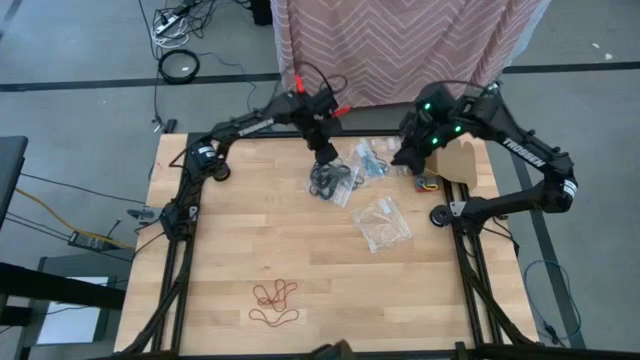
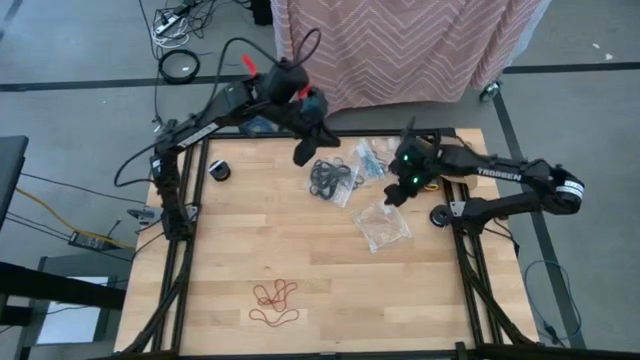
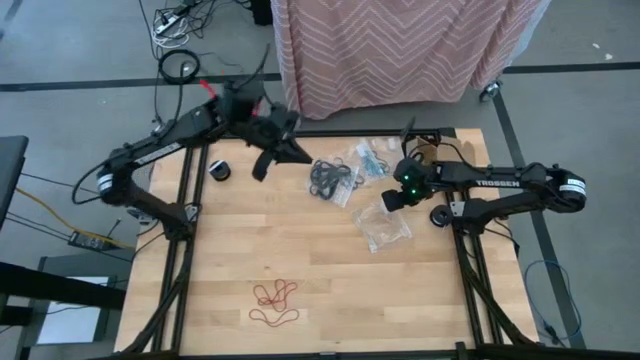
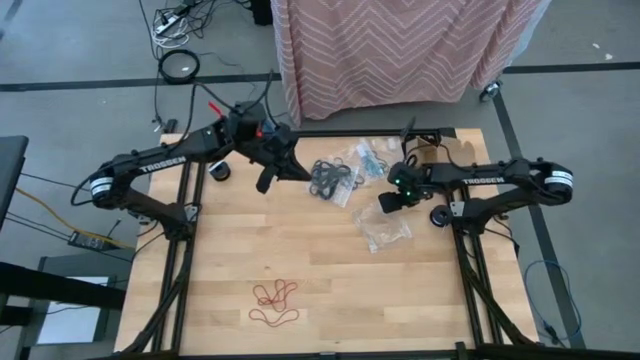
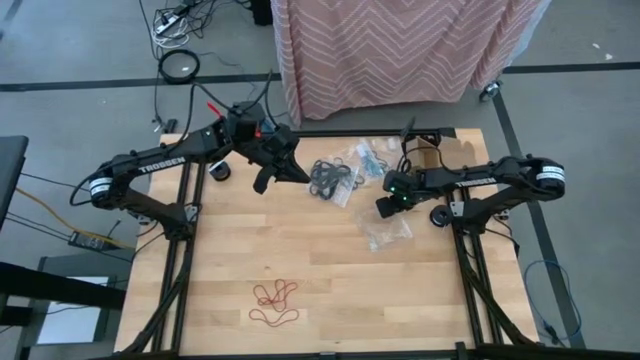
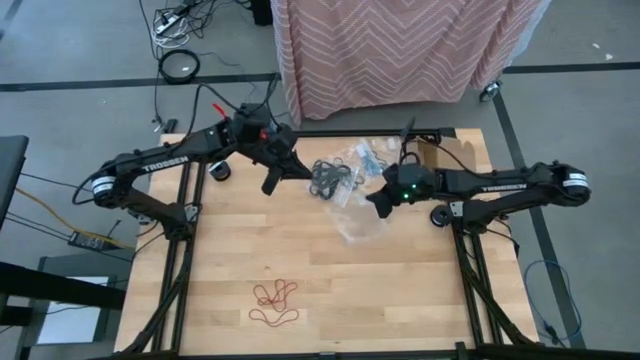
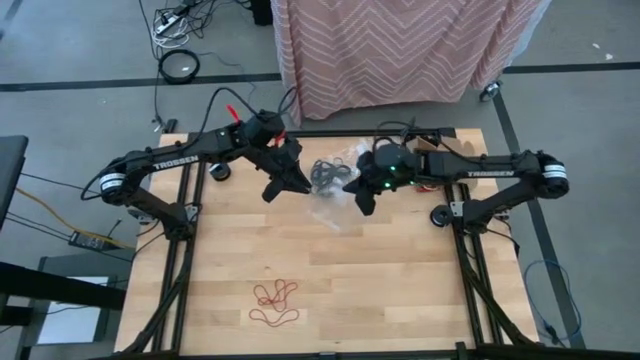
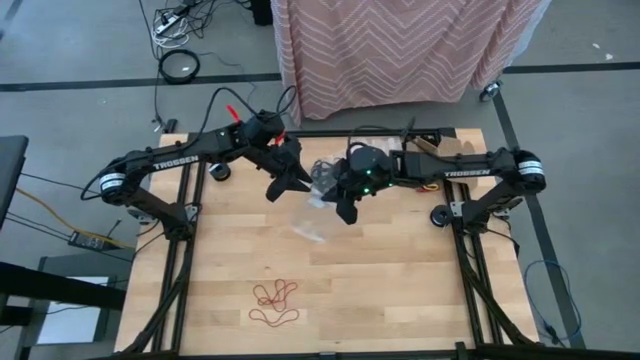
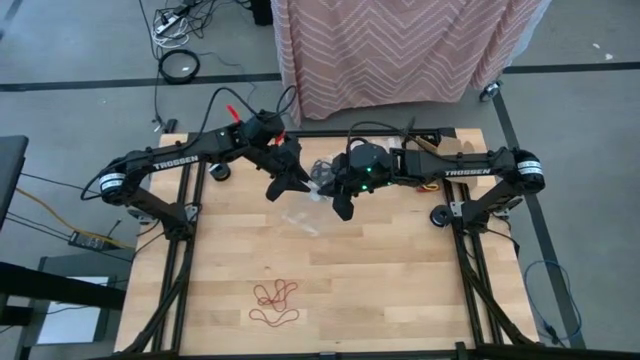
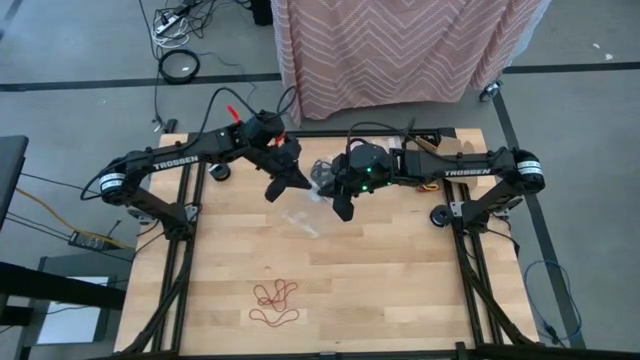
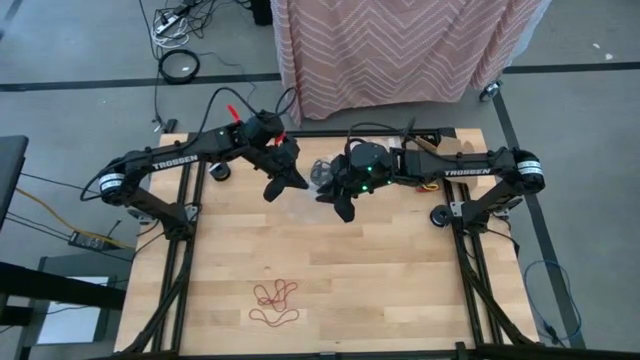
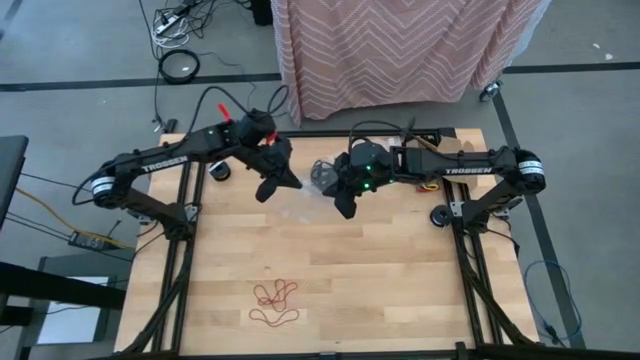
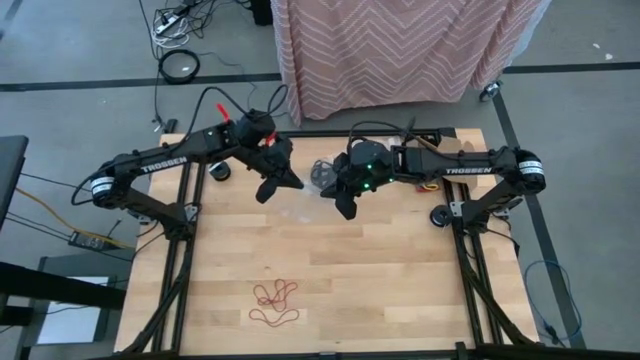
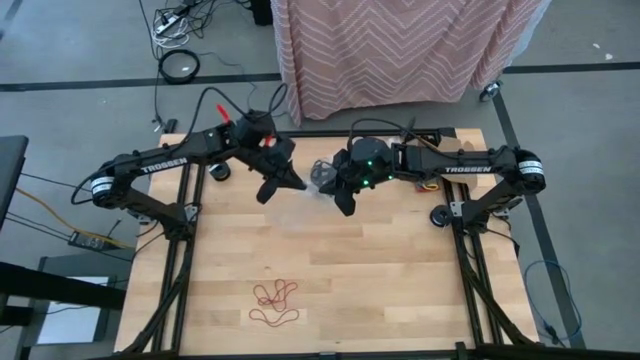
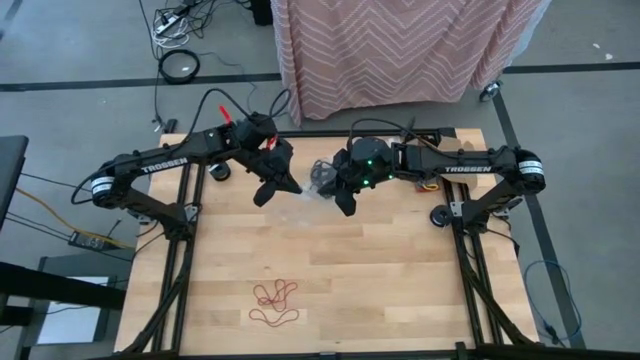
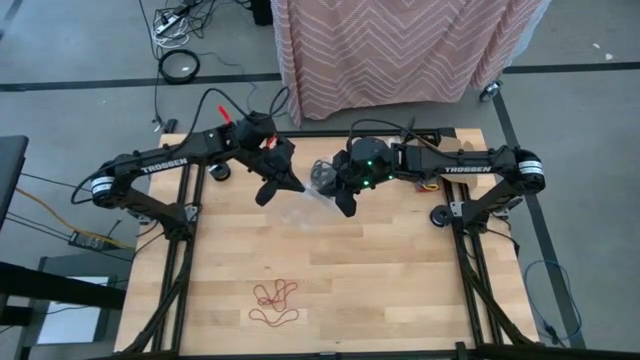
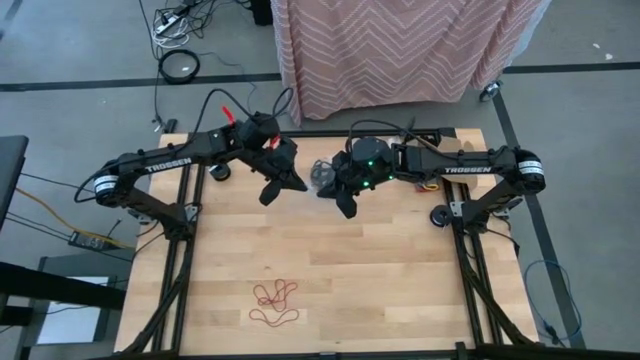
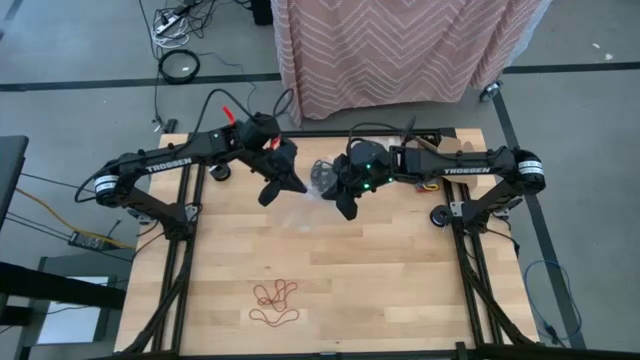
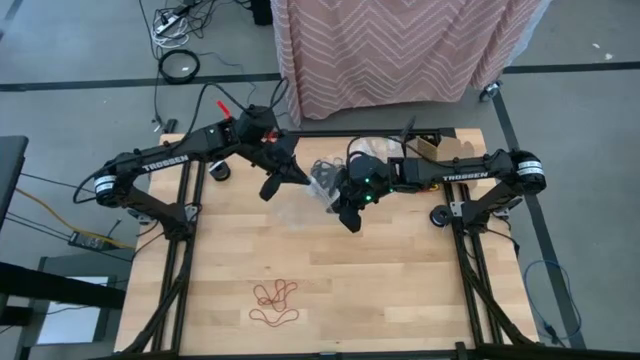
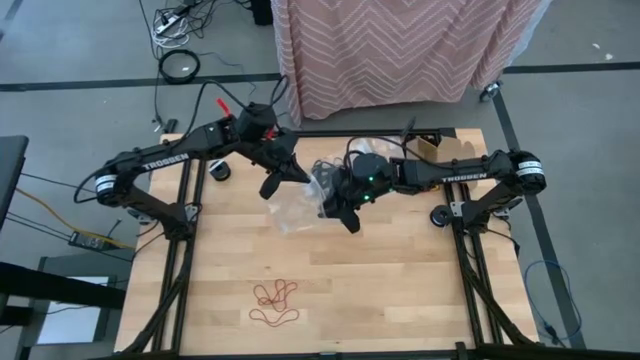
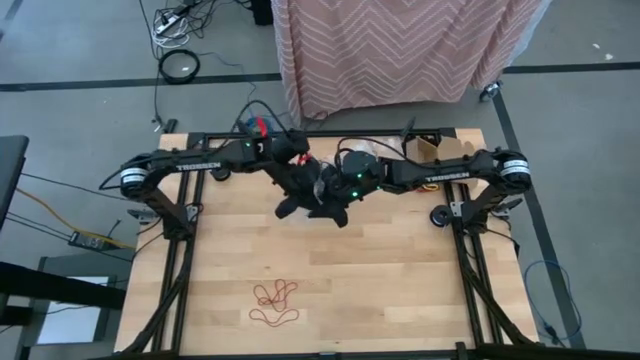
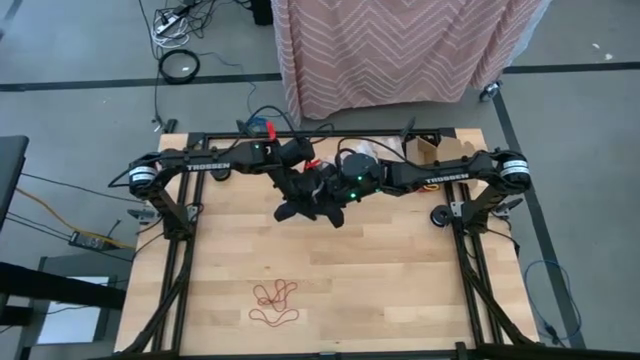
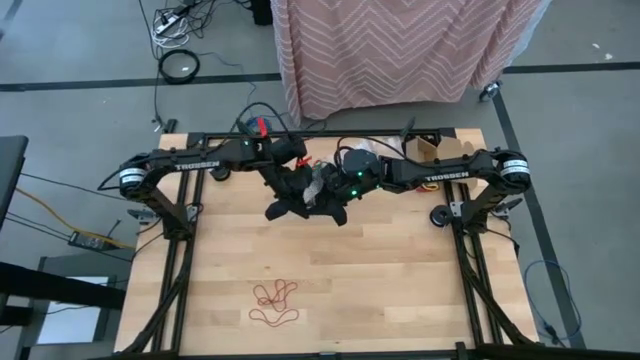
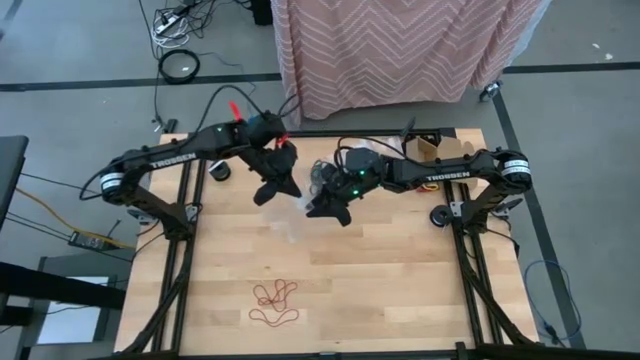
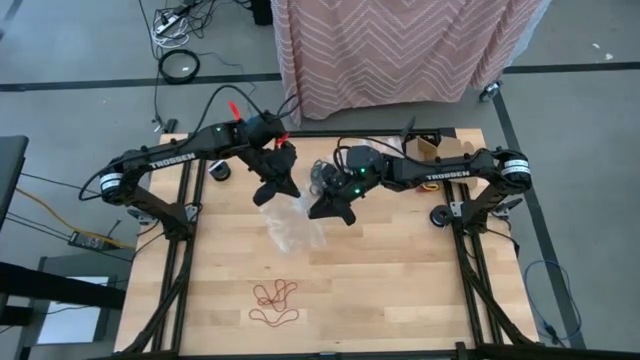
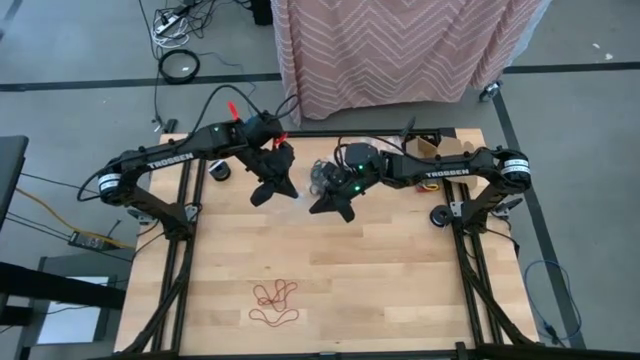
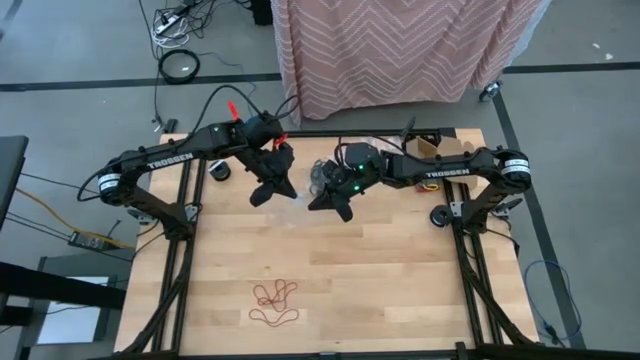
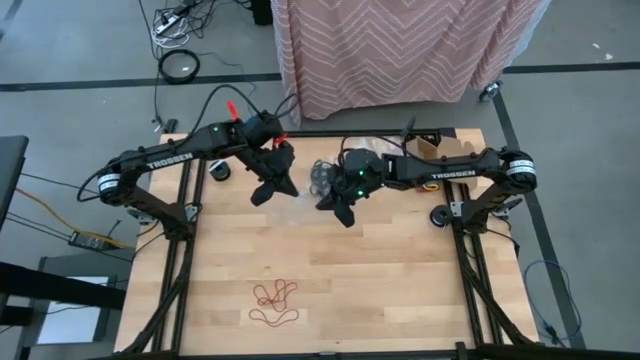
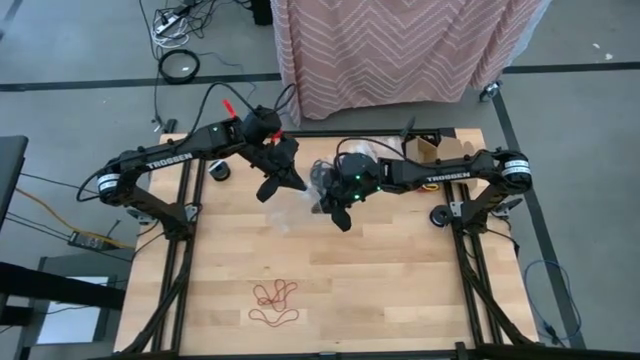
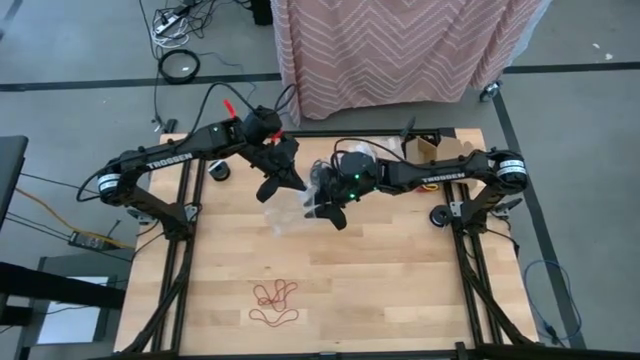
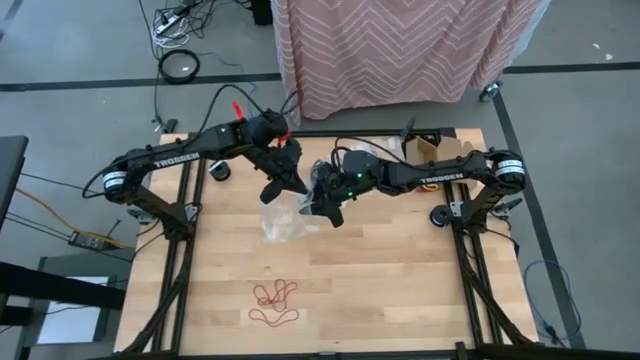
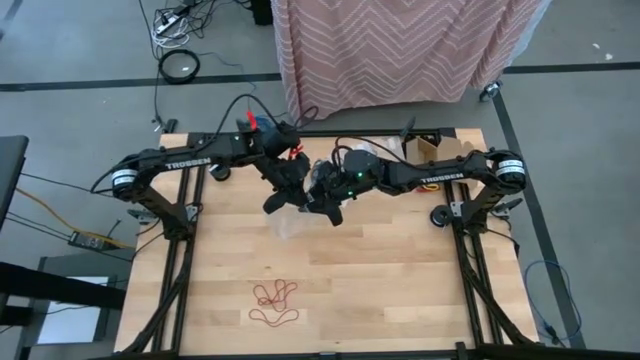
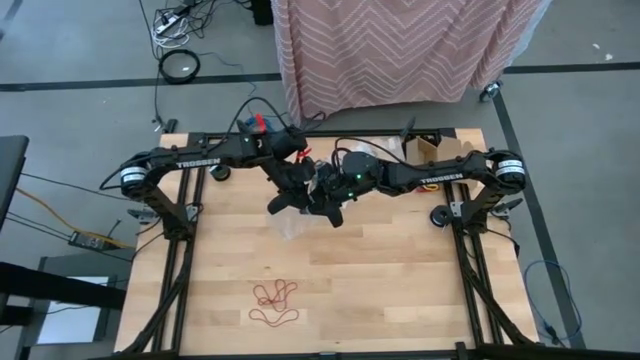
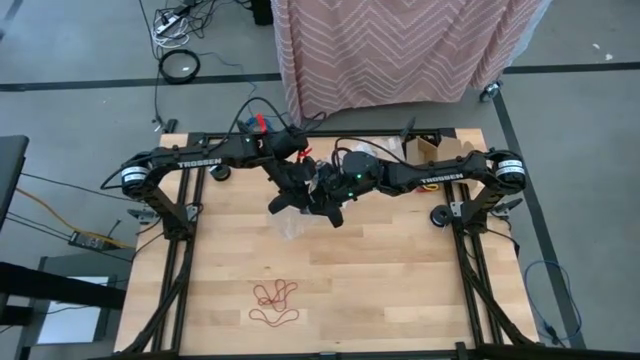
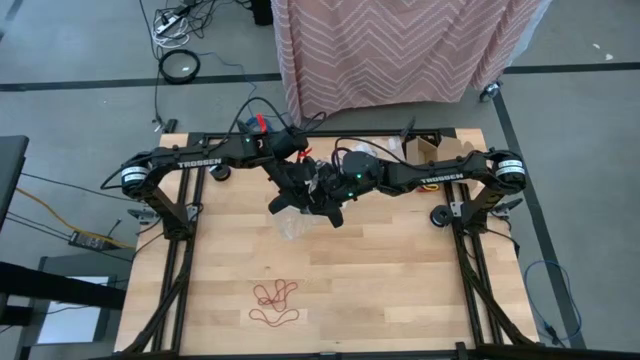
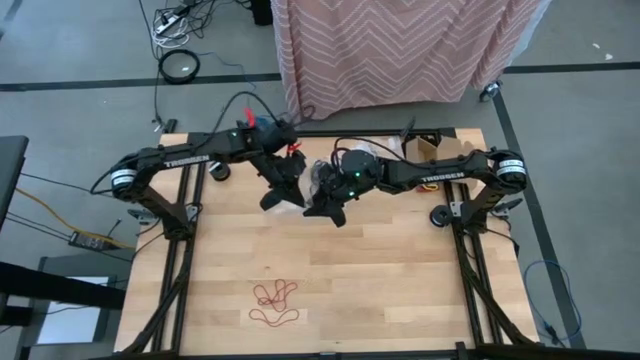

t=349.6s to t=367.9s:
Task: Sort rubber bands
Open the transparent zip bag

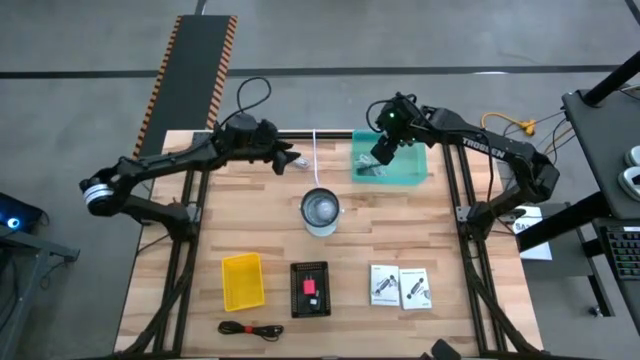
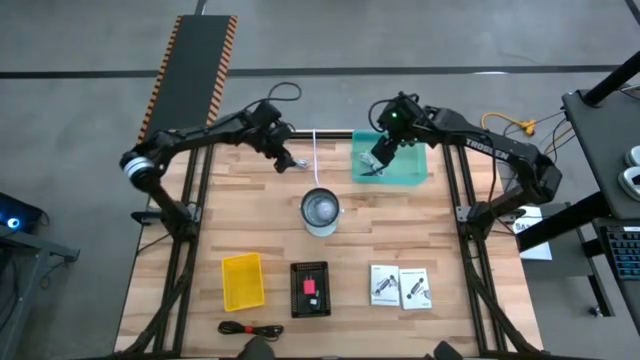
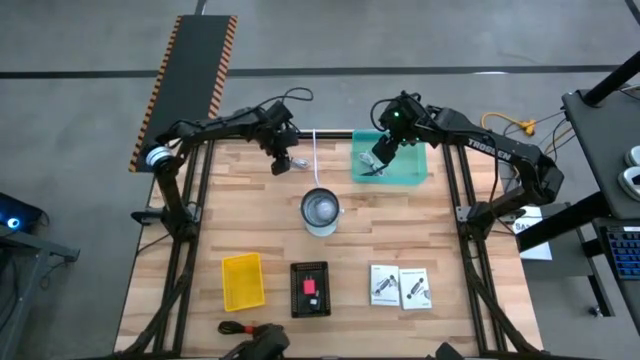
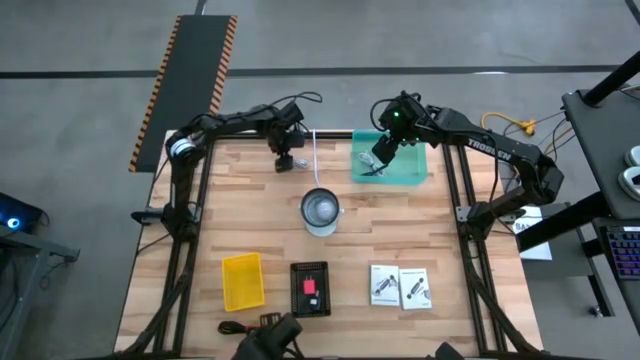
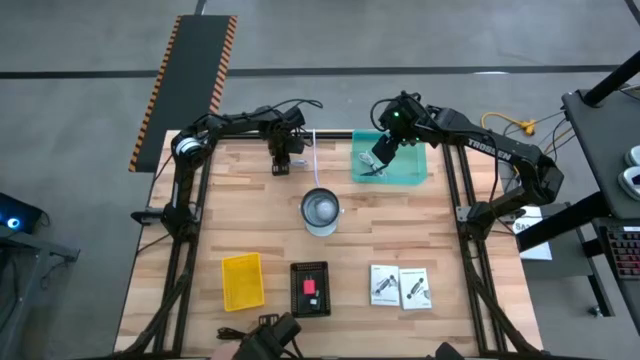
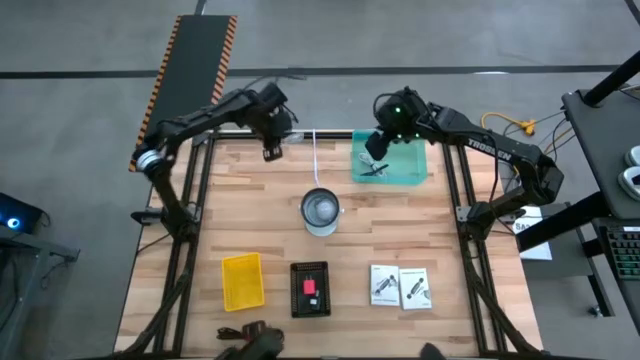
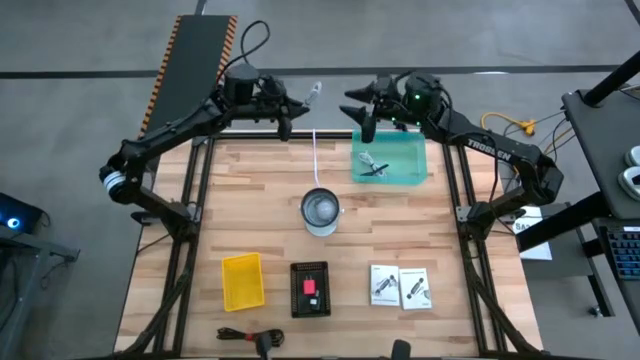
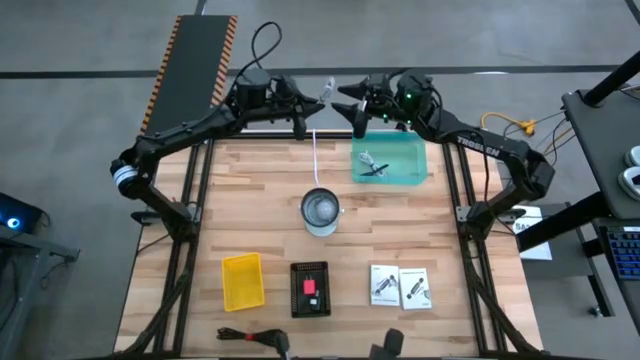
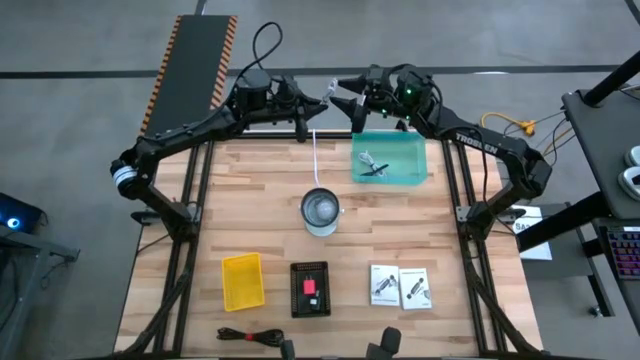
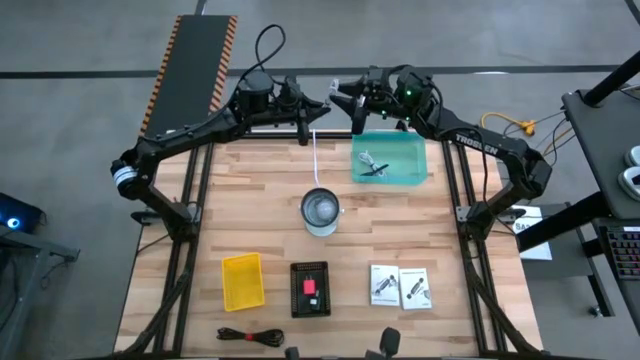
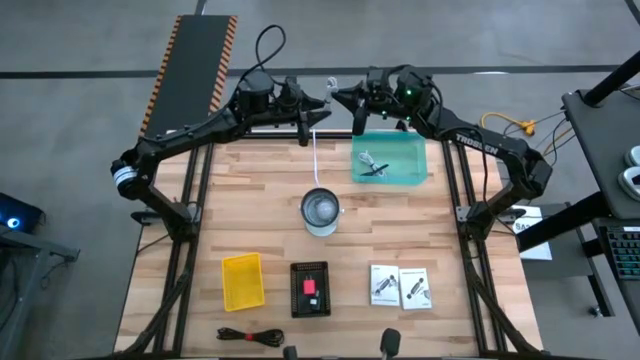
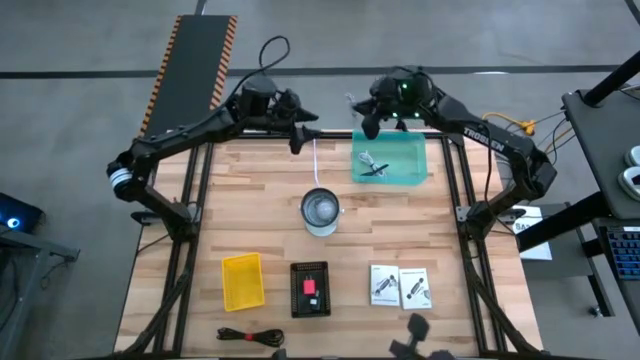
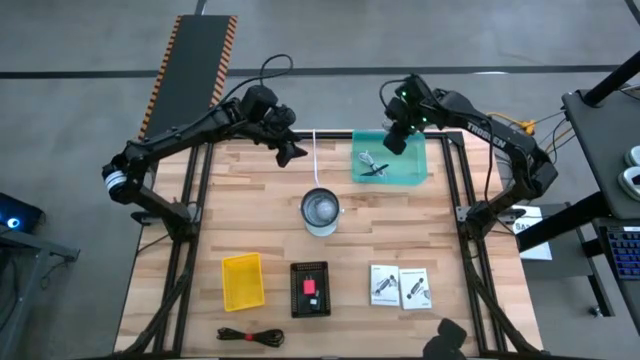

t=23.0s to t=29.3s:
Task: Pick and place items into bin
Put the blue USB cable into the green bin
